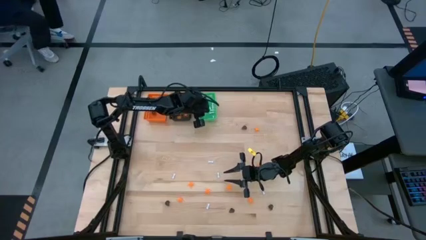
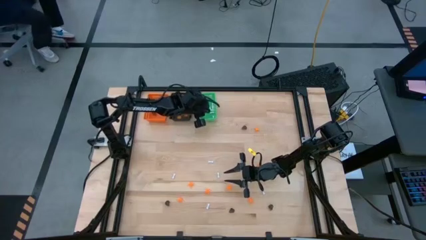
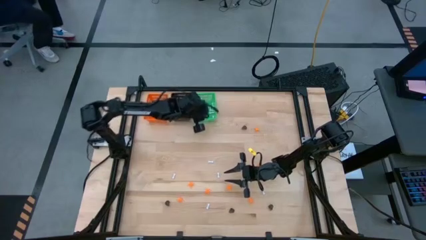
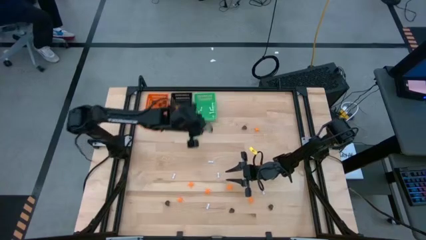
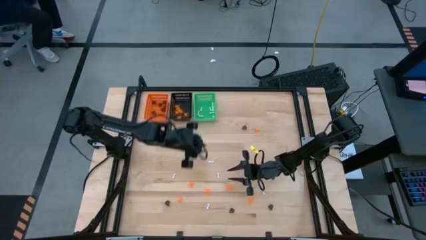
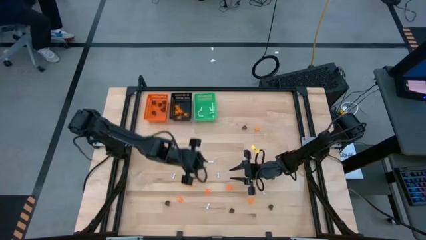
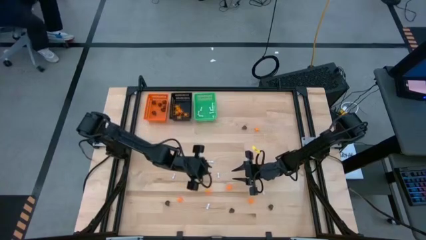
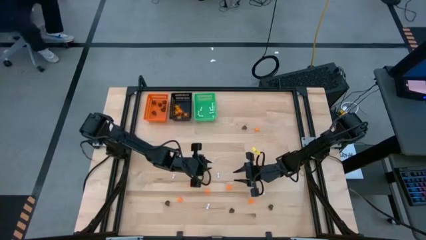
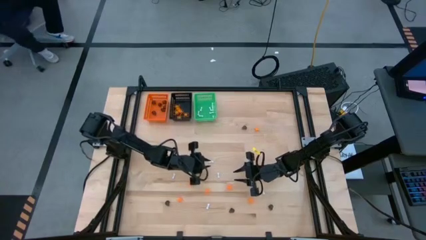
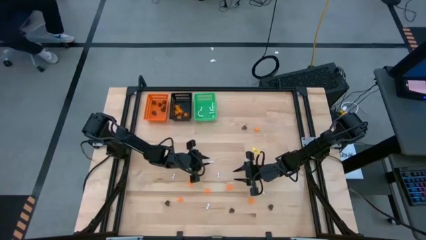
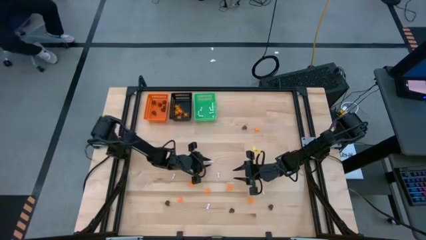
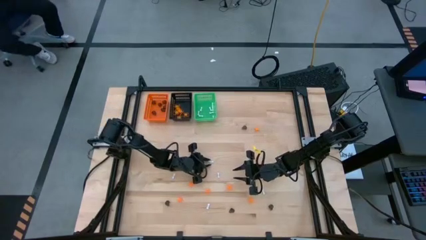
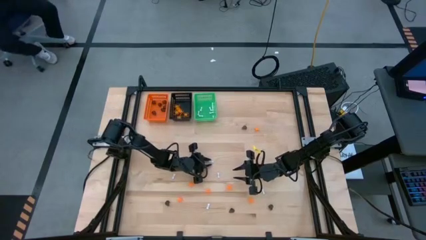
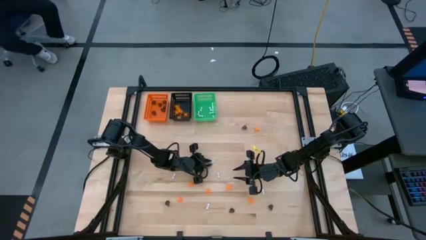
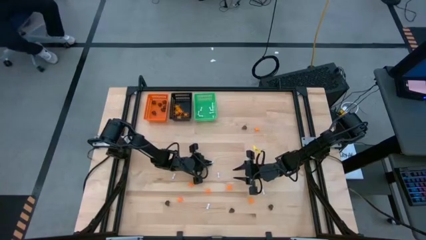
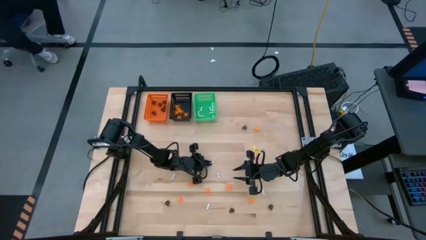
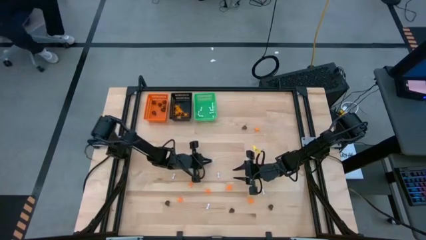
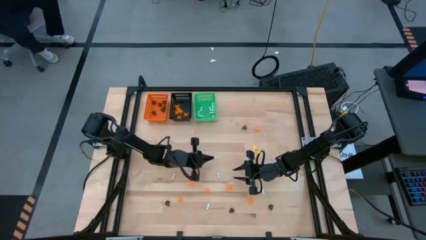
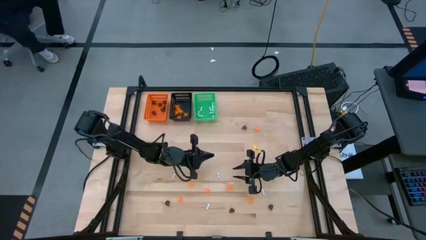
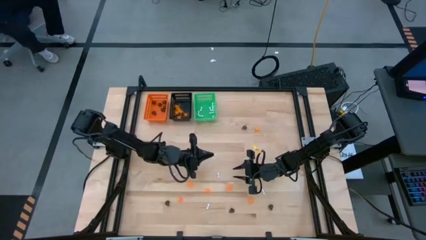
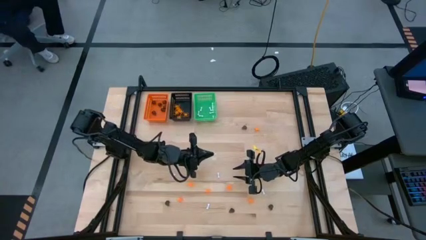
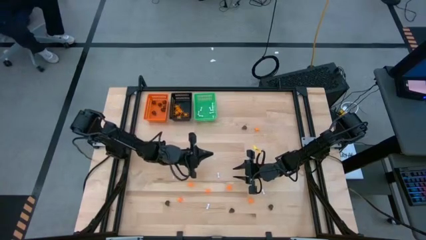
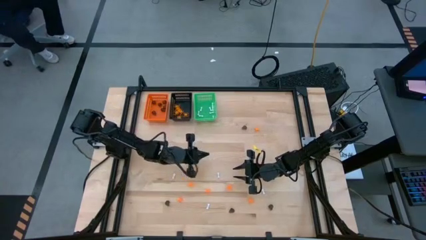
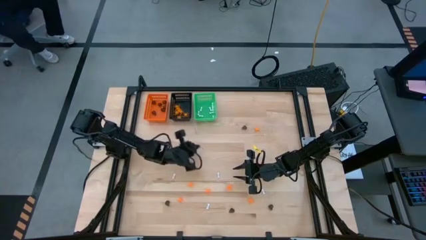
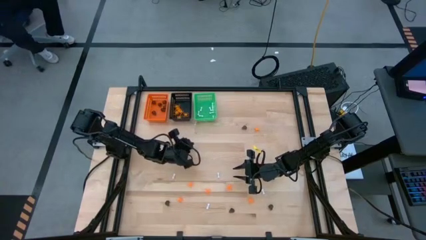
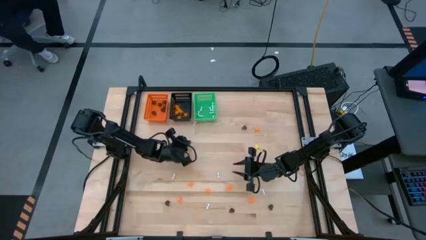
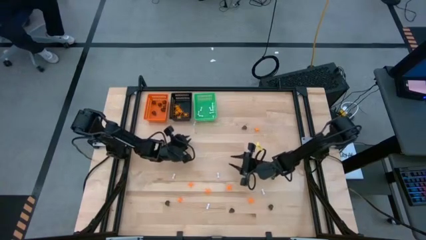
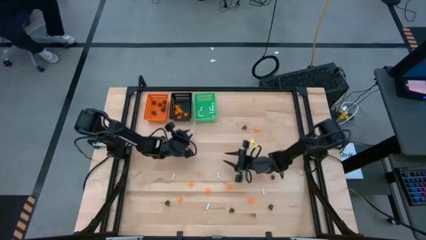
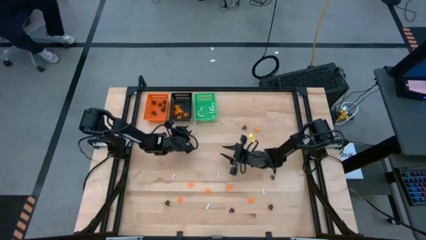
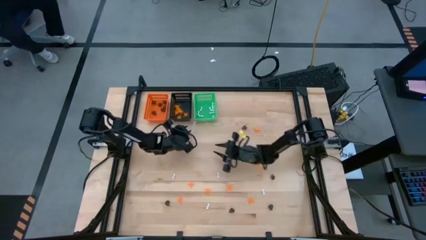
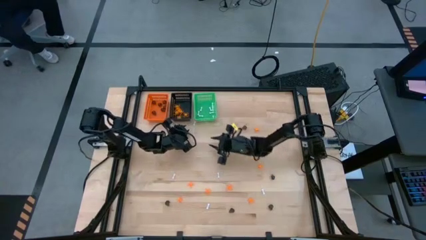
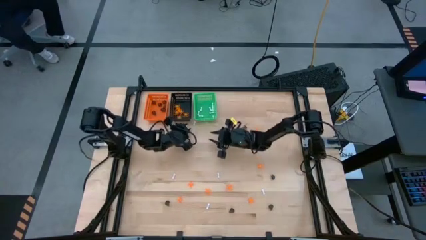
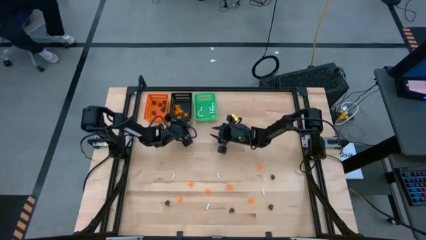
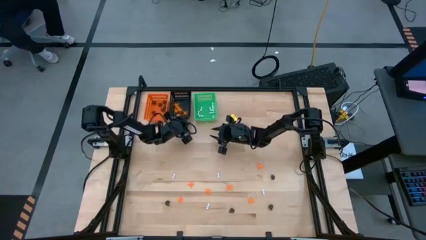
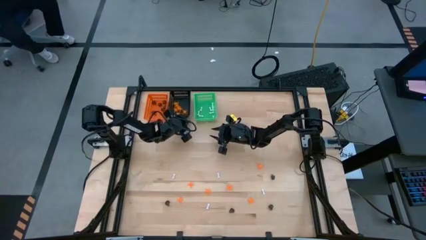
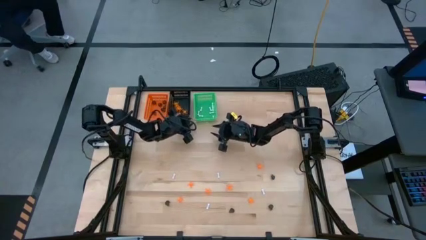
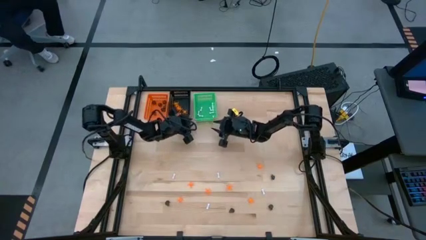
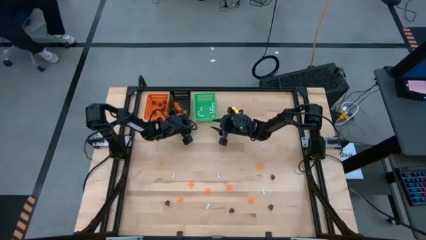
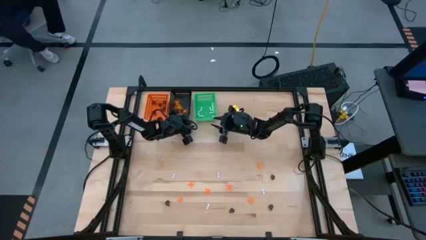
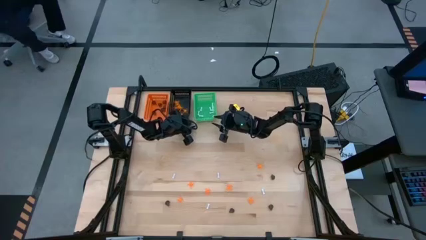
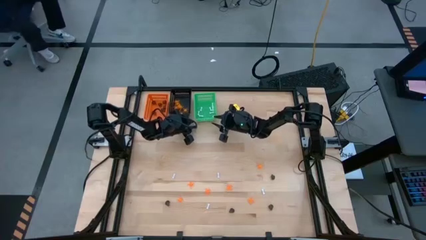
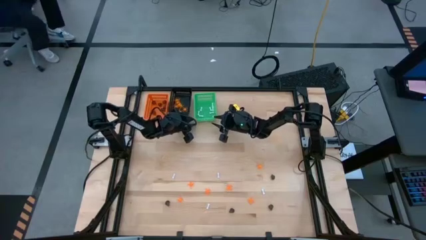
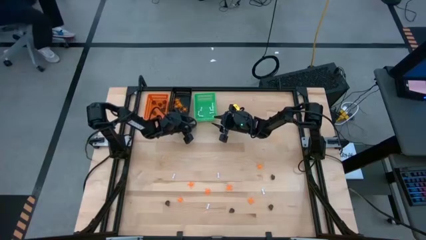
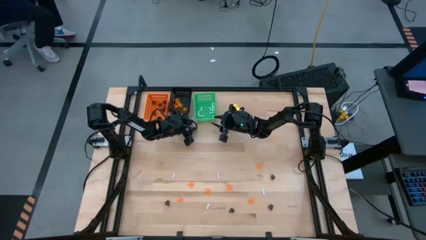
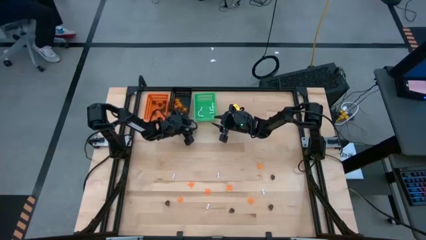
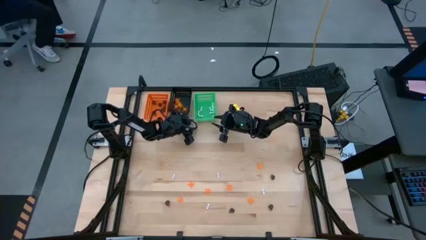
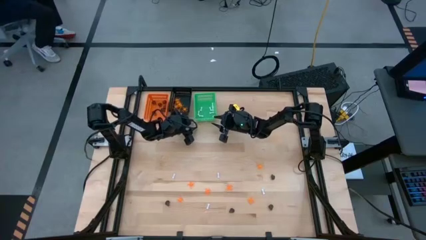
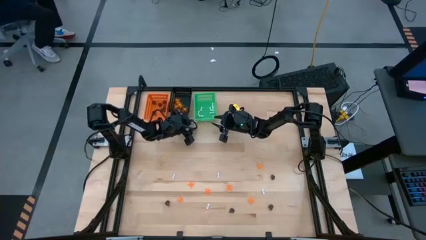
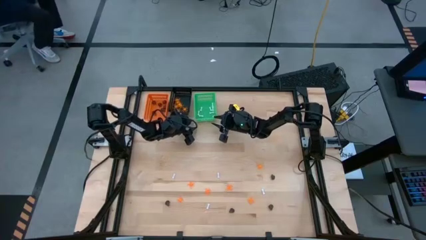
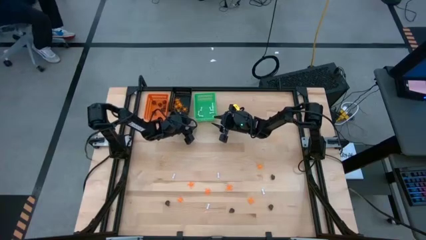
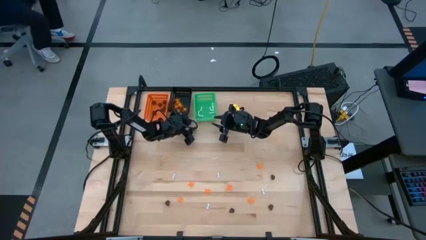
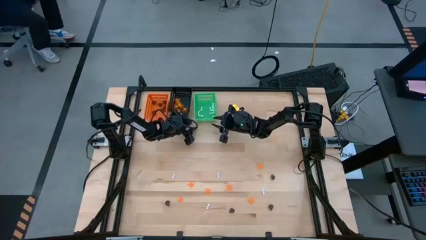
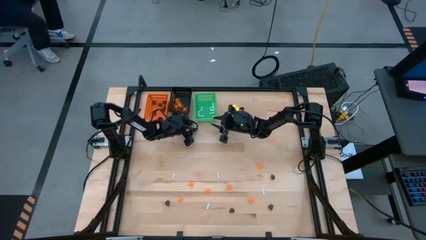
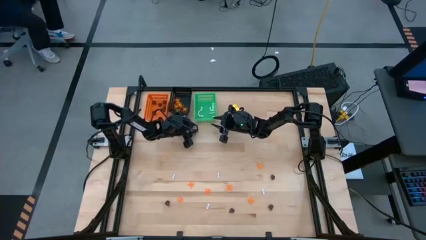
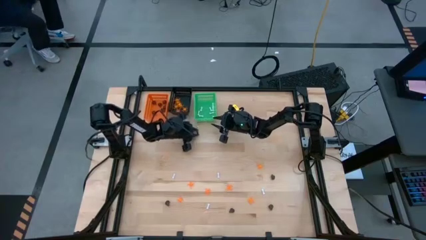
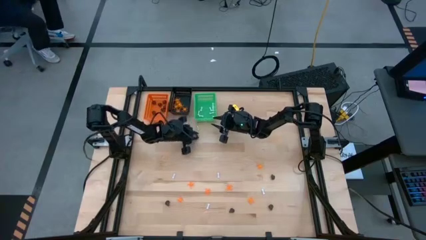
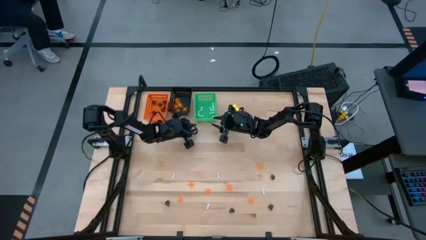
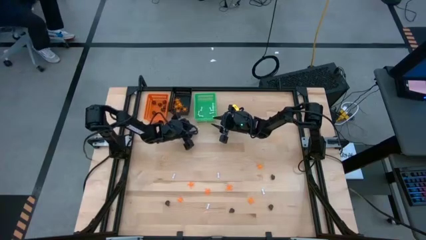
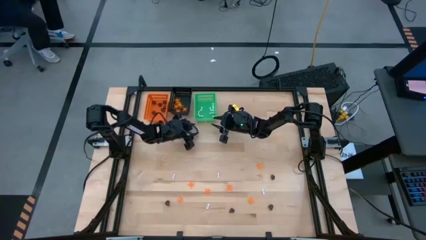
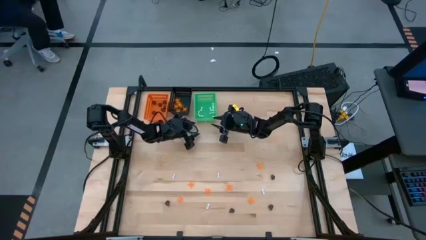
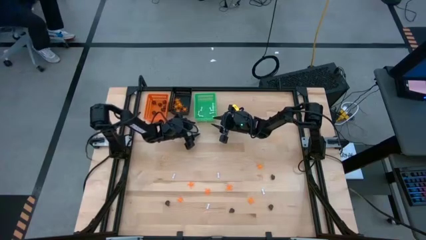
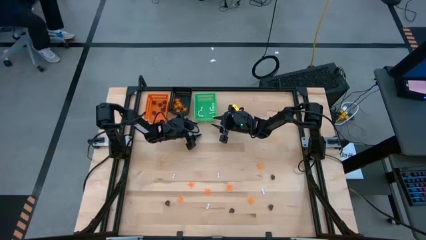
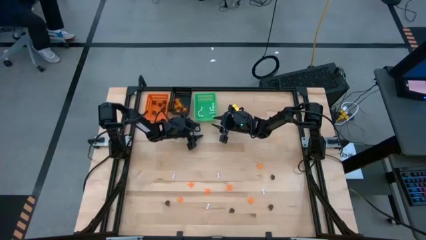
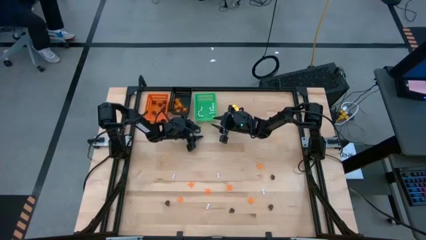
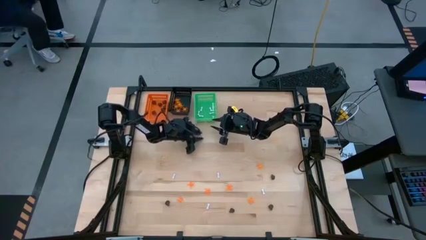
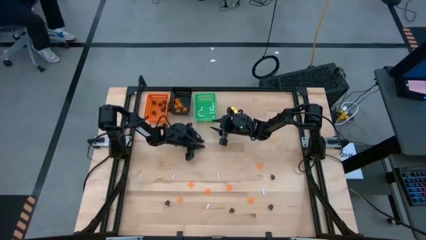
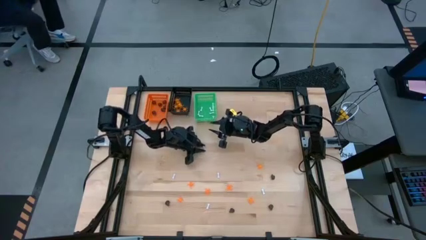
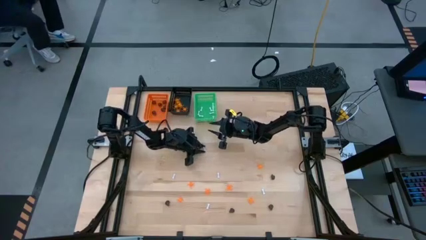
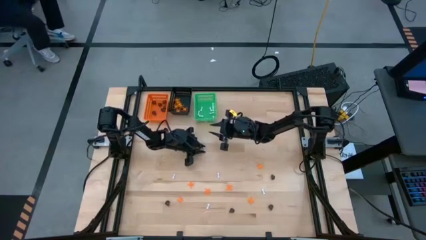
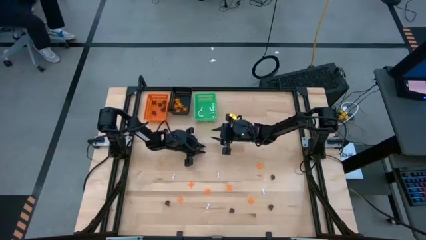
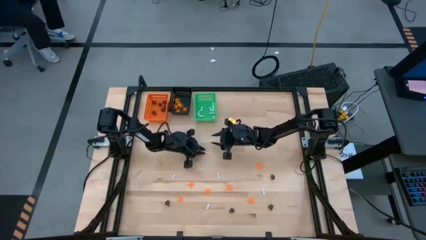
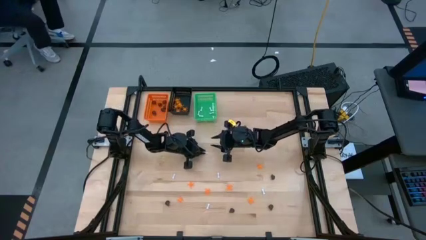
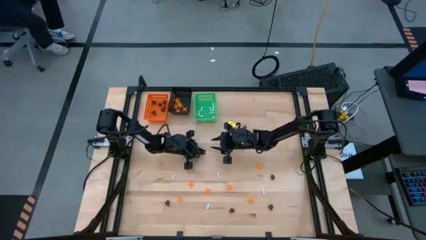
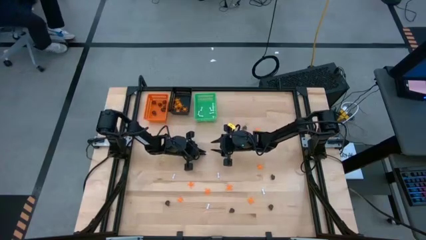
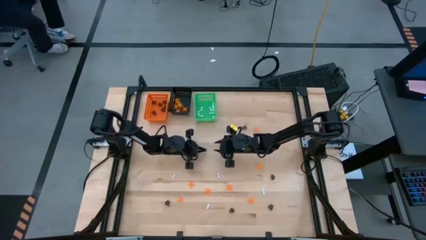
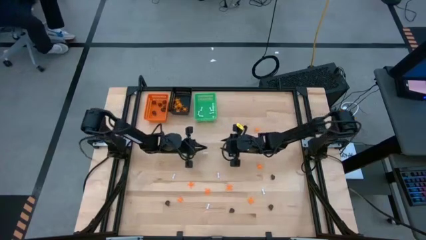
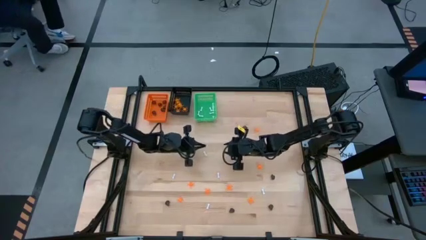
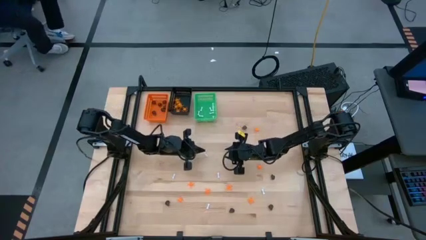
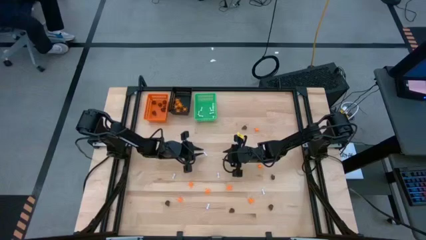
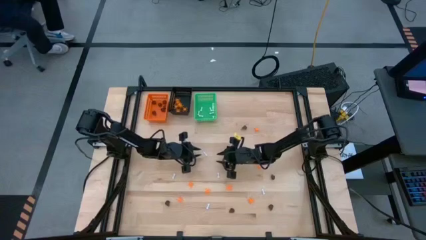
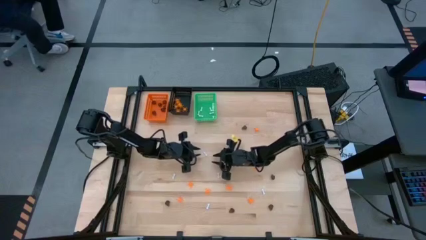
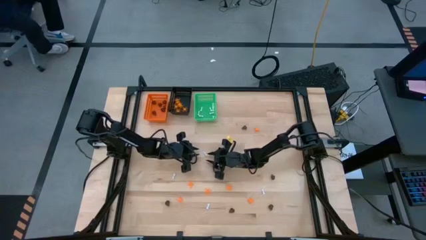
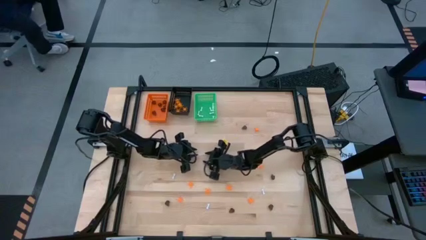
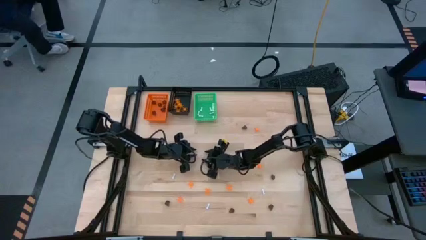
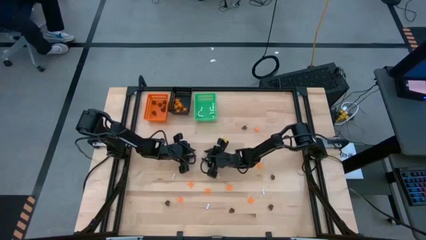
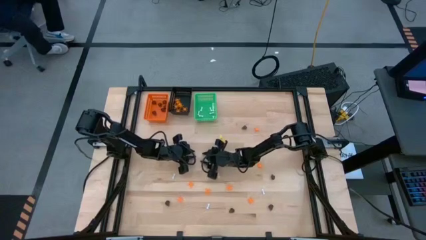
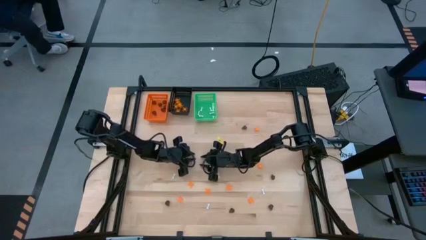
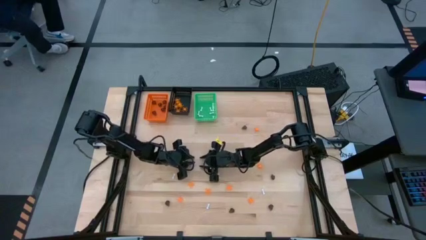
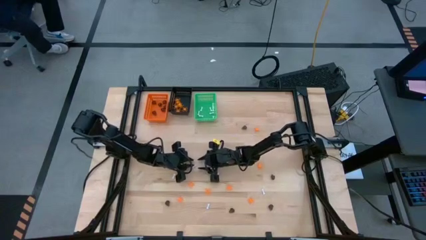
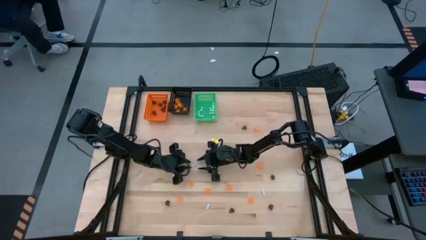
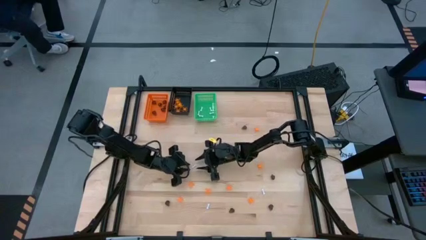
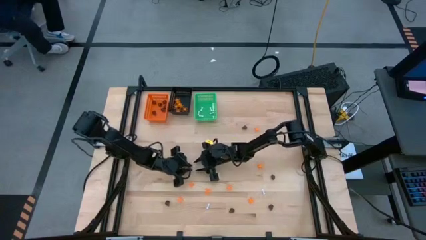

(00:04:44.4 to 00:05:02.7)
Task: Sort Halloween decoration
Put the white bone toy into the green bin
